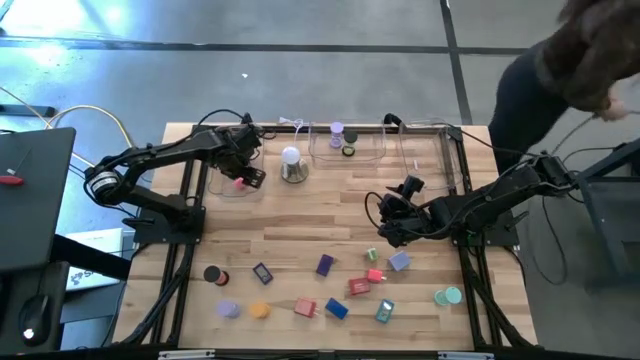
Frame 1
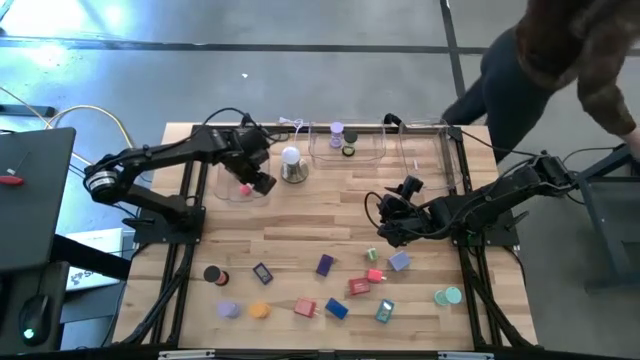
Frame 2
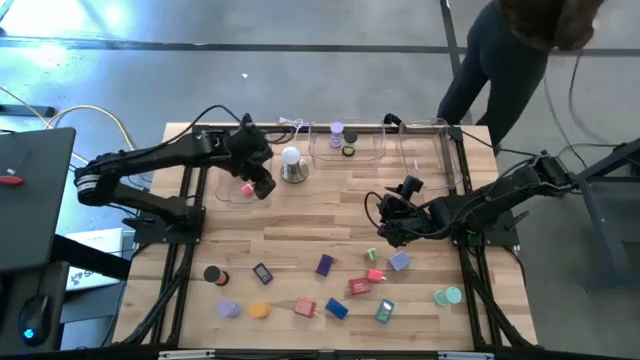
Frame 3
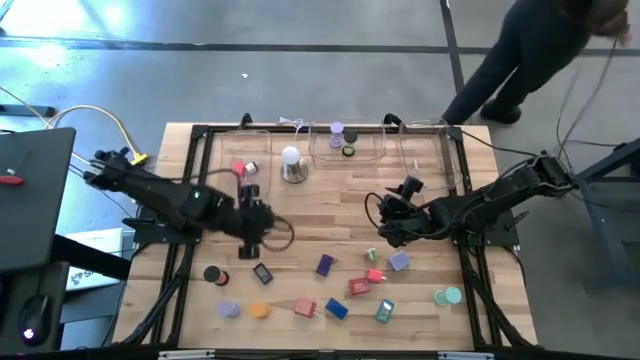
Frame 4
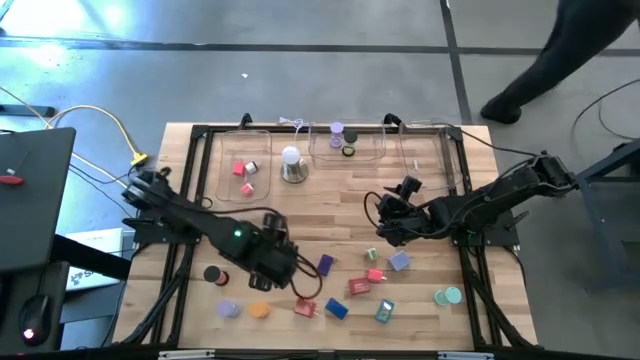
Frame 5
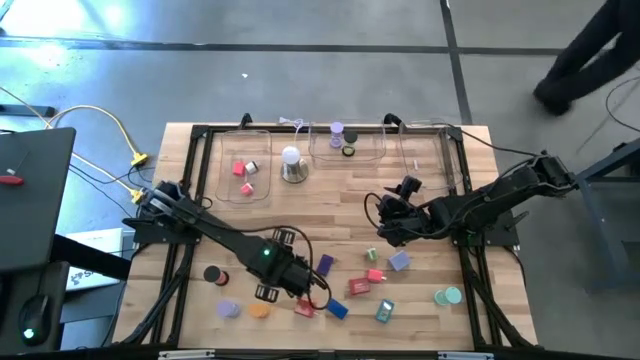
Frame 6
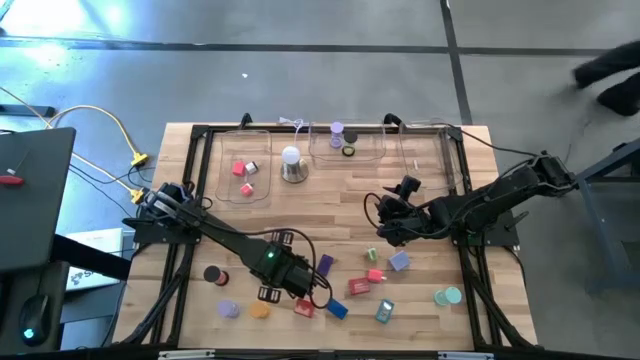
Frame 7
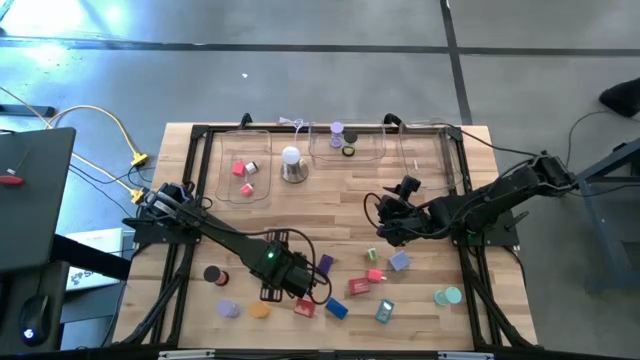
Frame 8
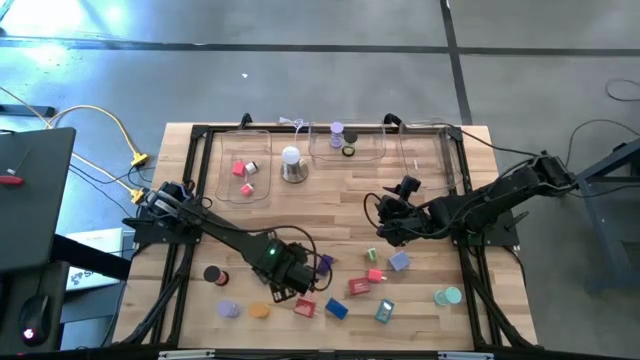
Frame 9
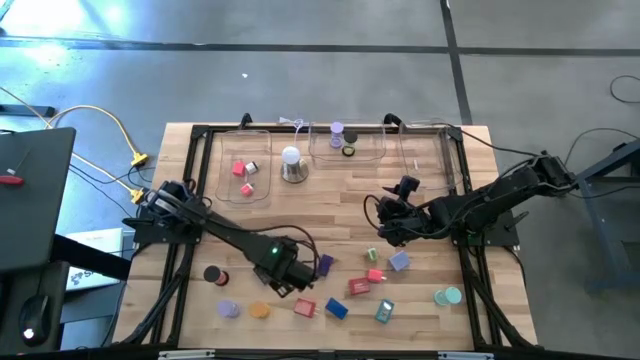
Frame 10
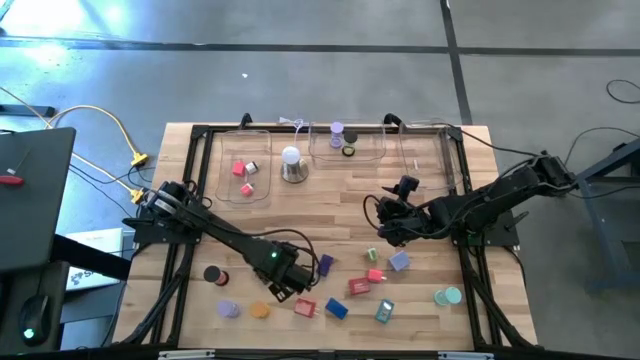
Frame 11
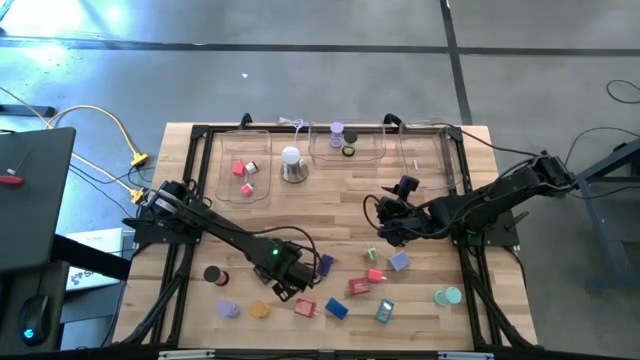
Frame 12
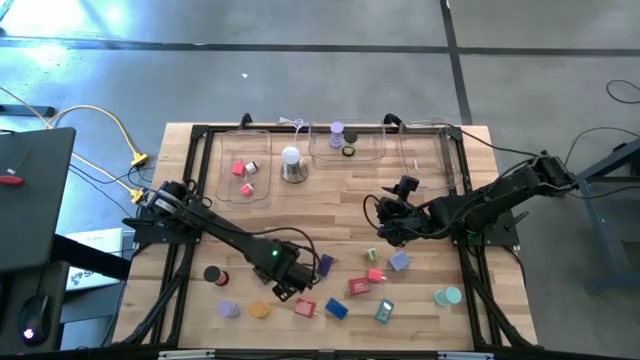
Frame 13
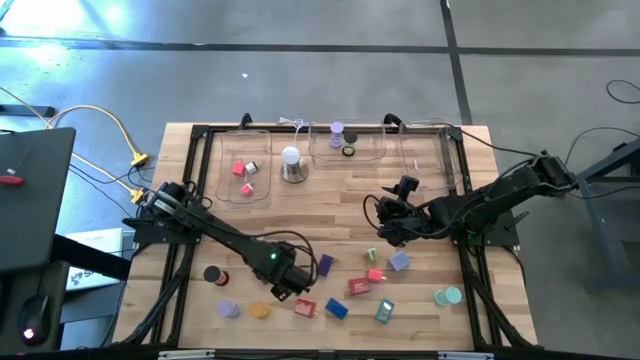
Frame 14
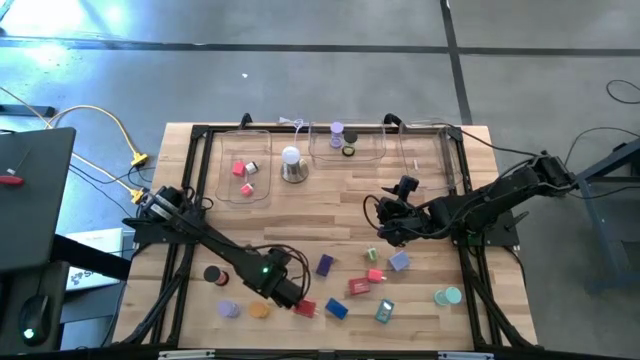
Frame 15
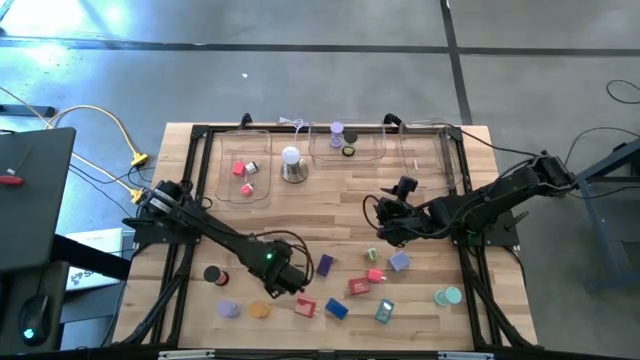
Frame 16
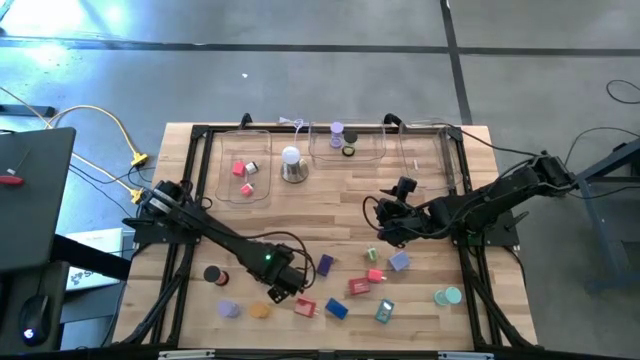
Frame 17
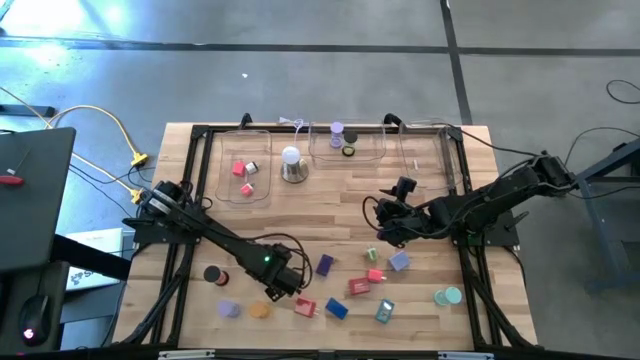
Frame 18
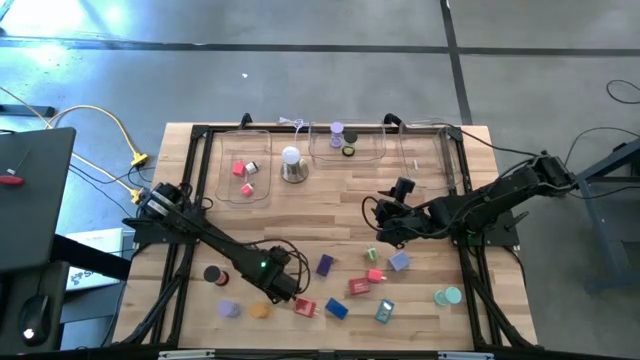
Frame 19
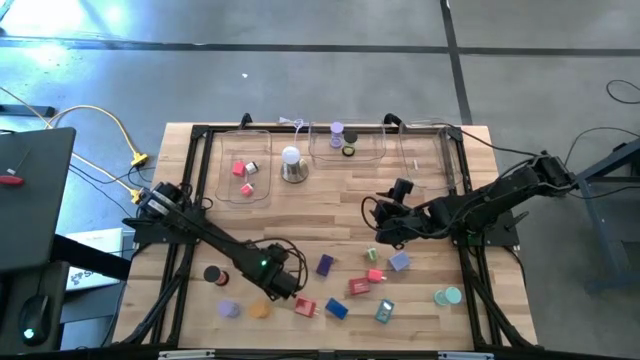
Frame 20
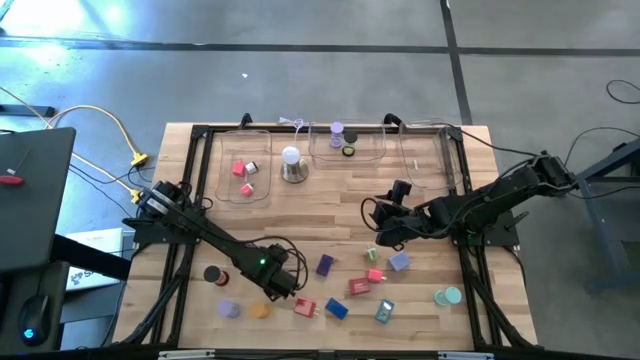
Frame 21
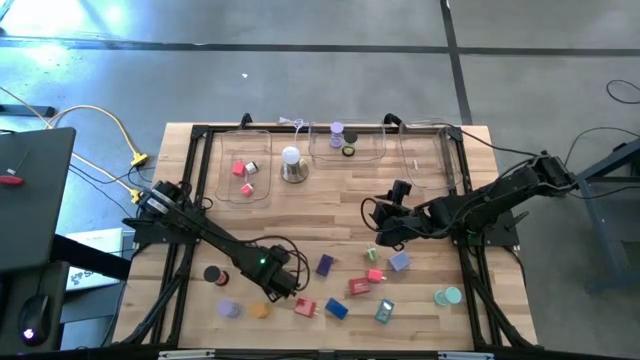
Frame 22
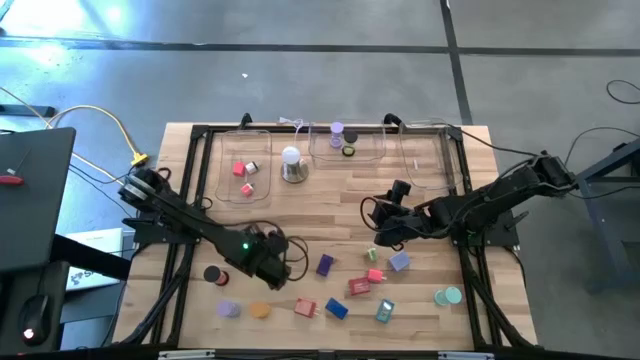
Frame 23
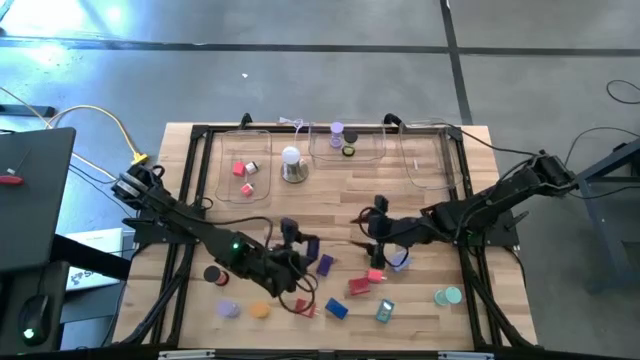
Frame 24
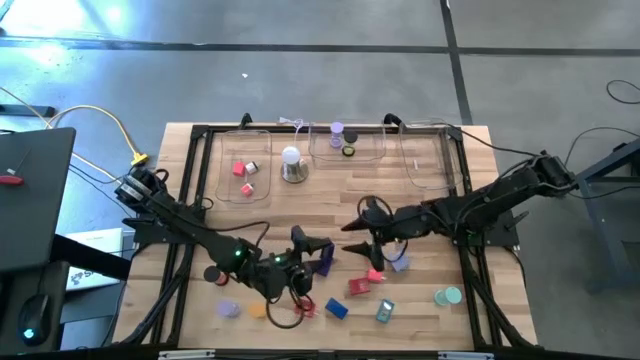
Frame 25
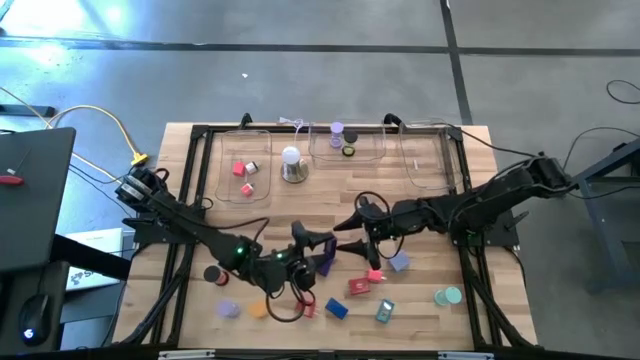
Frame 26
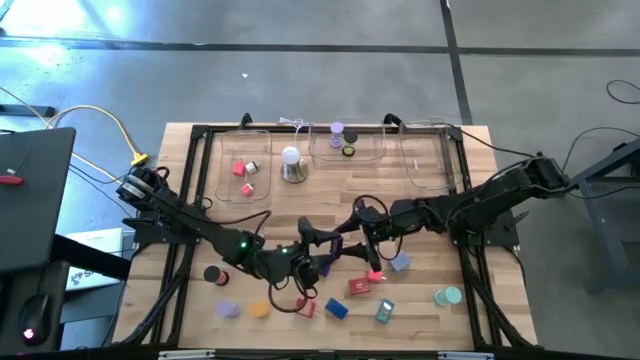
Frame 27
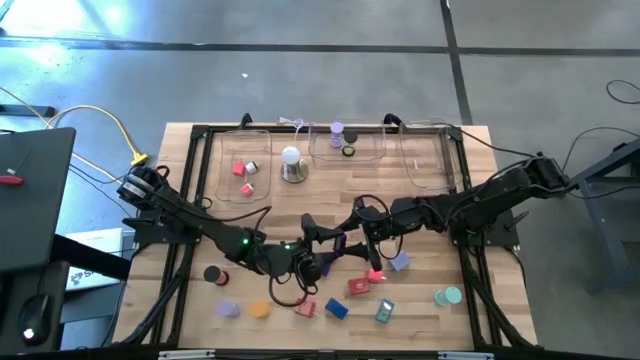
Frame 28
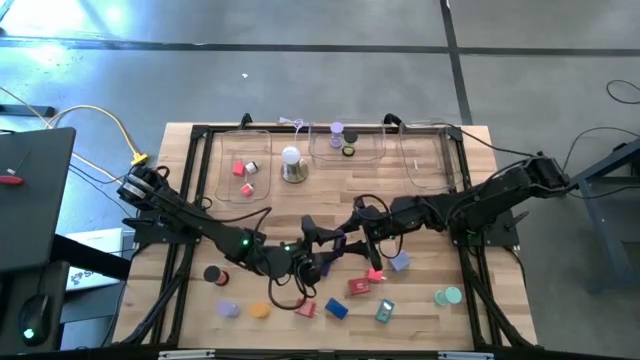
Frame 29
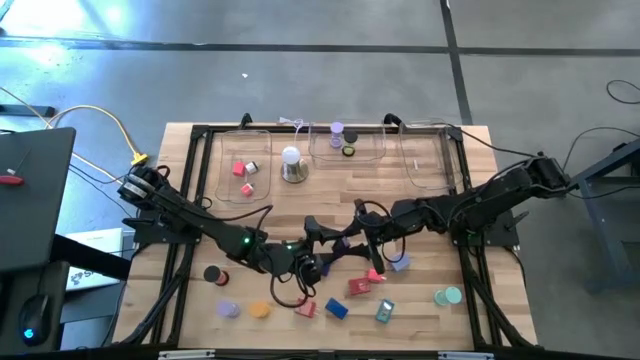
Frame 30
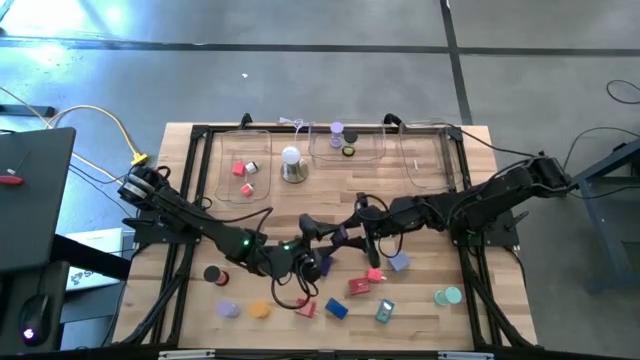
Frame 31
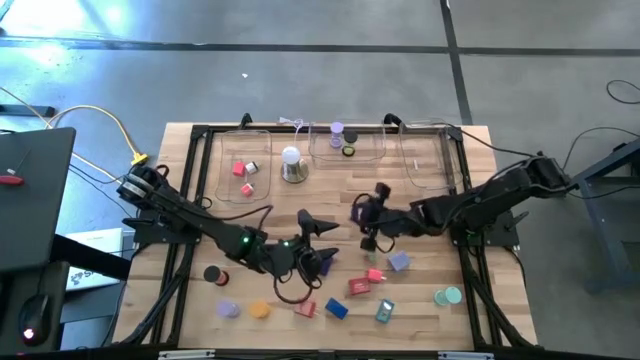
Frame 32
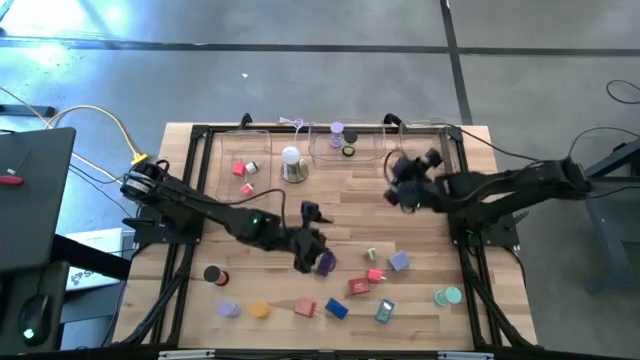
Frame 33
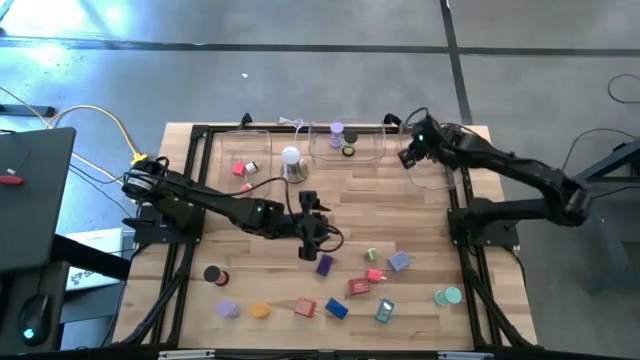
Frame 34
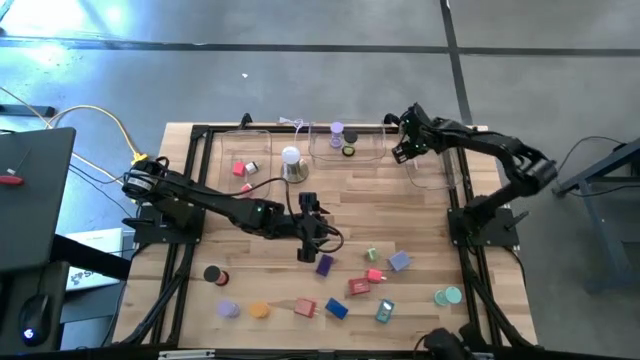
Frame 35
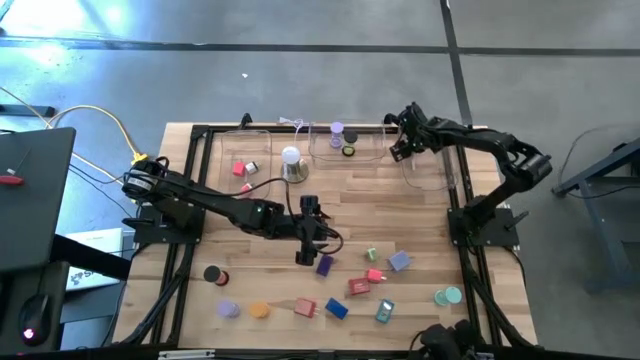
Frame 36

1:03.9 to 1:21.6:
Task: Pick & Place Office items
Put the left blue digital clock into the right transparent bin

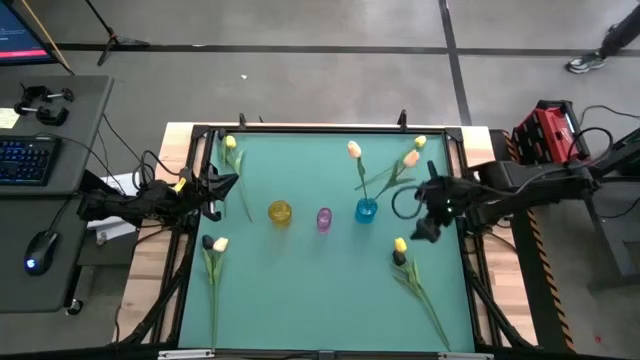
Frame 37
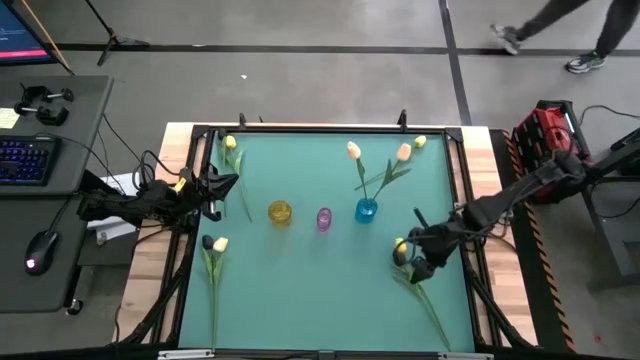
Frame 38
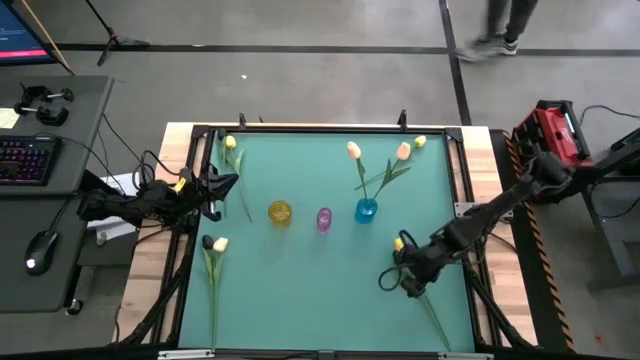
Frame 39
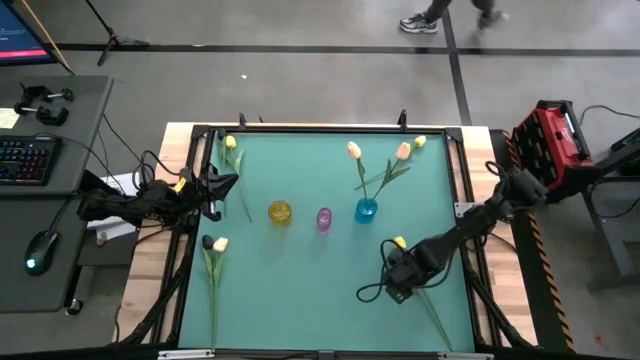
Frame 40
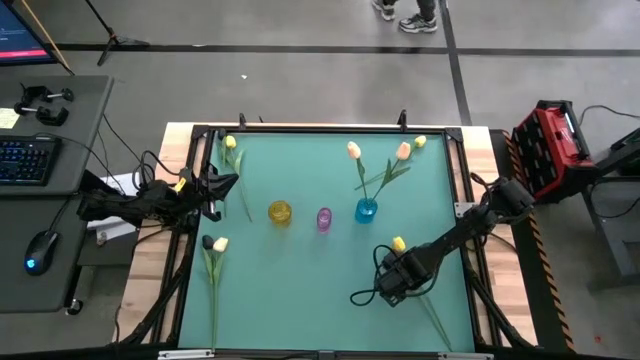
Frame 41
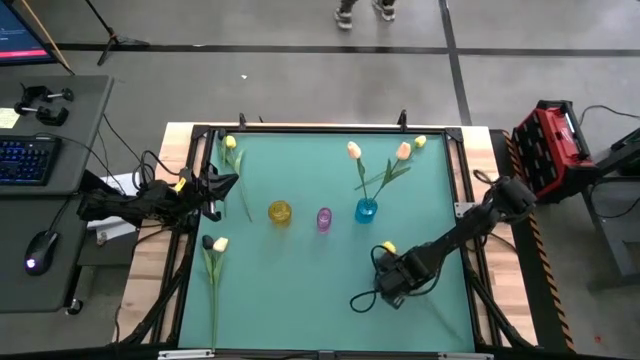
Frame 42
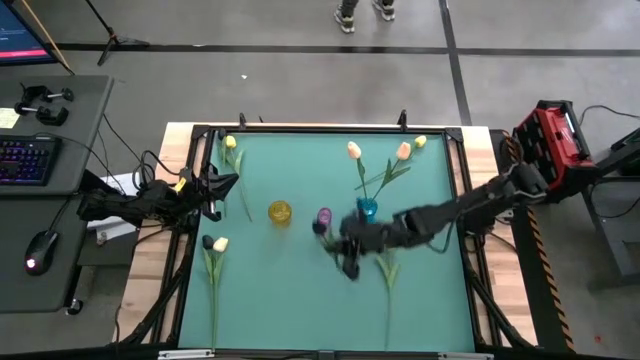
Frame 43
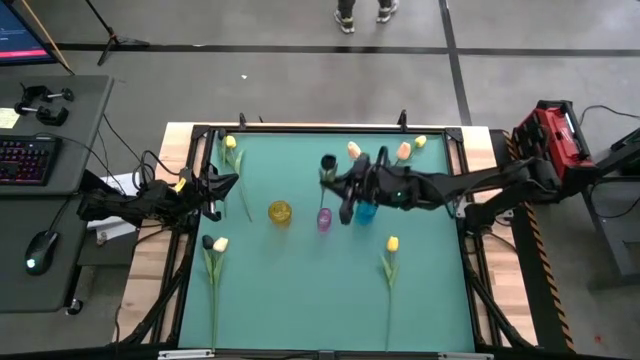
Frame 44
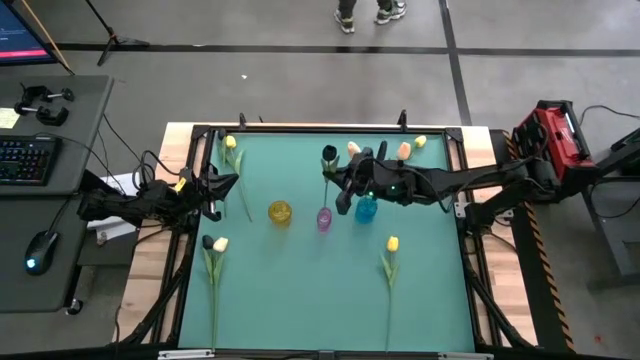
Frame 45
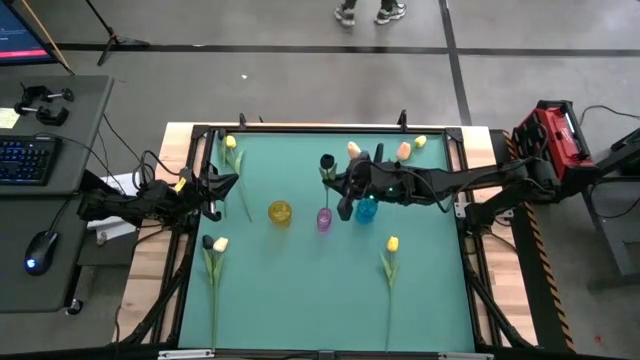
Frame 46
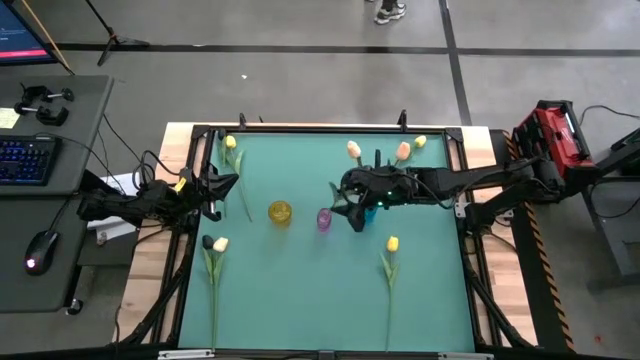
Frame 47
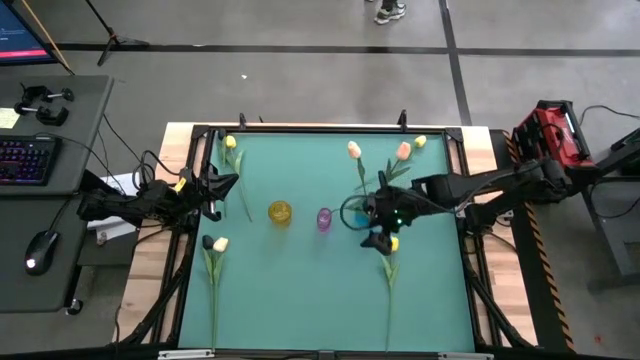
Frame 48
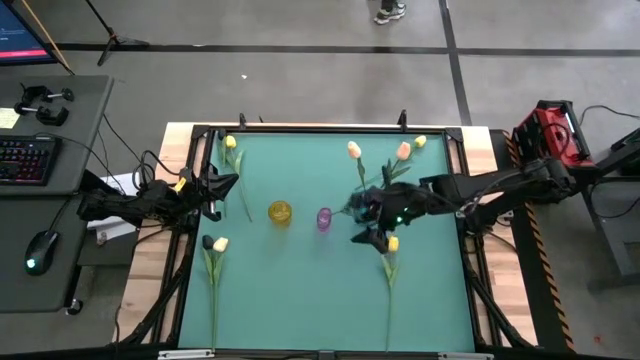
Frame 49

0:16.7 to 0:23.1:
Task: Sort flowers into vase by color
Put the right black tulip into the purple flower vase
